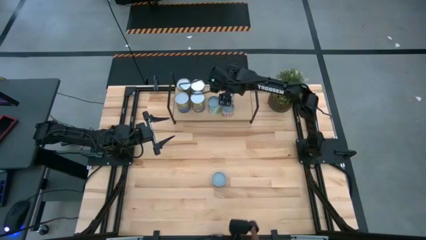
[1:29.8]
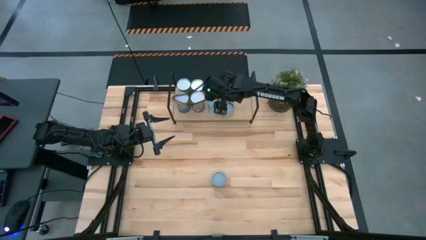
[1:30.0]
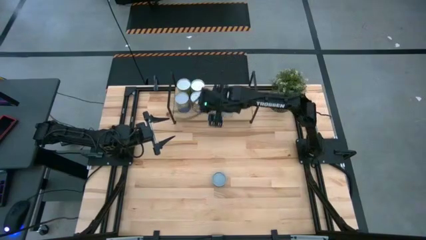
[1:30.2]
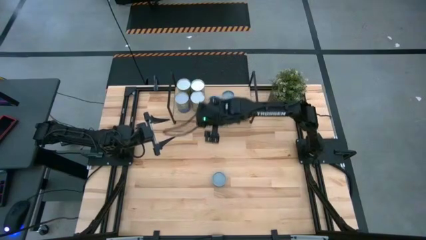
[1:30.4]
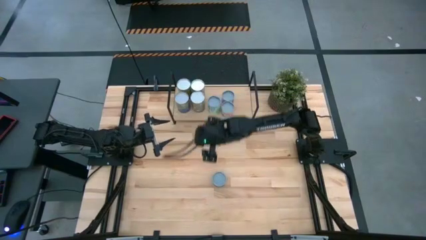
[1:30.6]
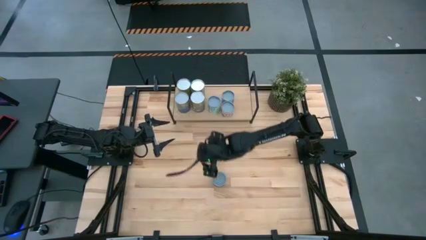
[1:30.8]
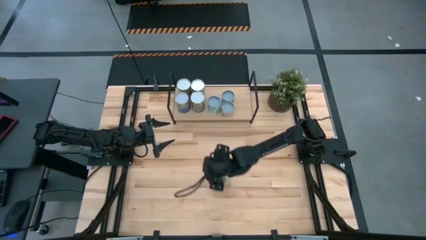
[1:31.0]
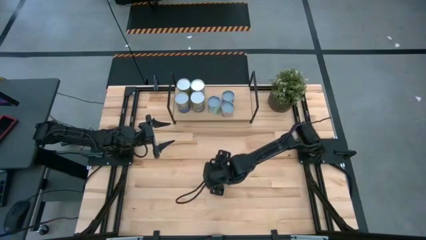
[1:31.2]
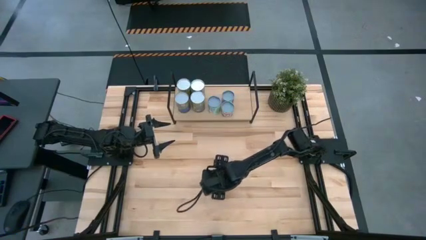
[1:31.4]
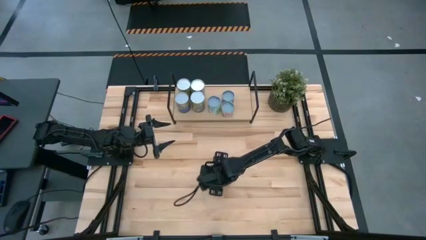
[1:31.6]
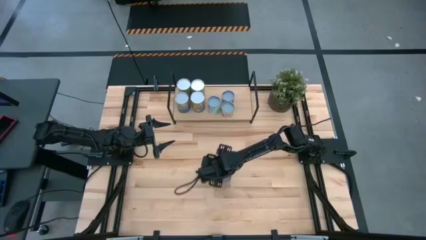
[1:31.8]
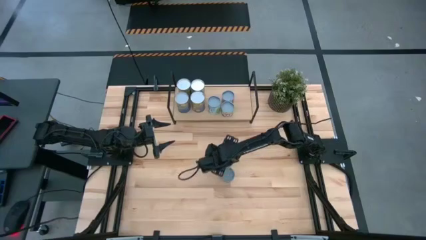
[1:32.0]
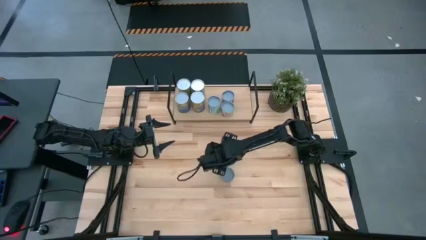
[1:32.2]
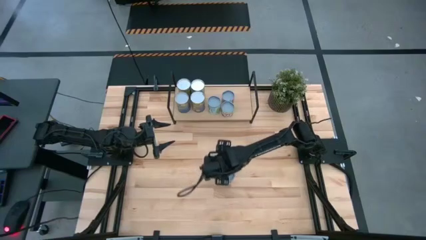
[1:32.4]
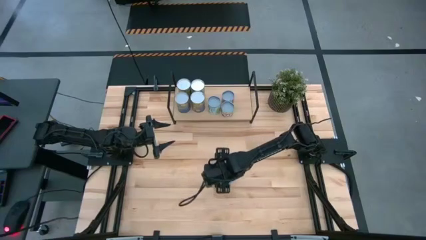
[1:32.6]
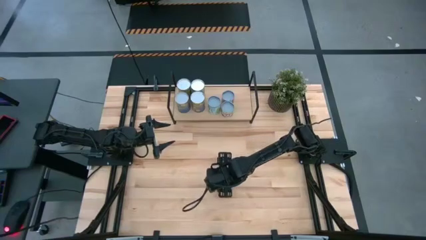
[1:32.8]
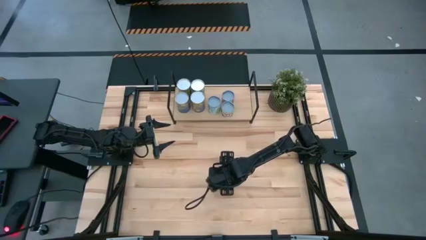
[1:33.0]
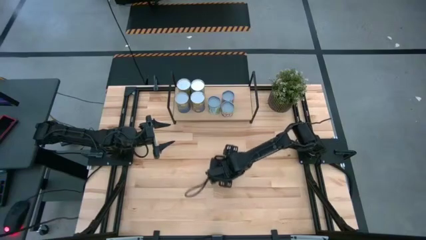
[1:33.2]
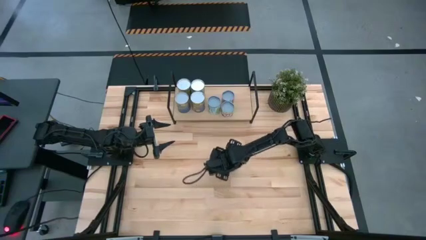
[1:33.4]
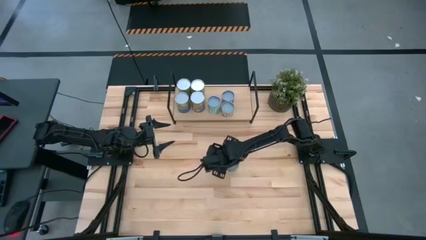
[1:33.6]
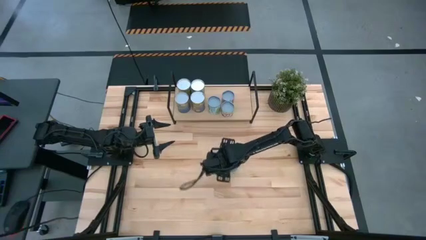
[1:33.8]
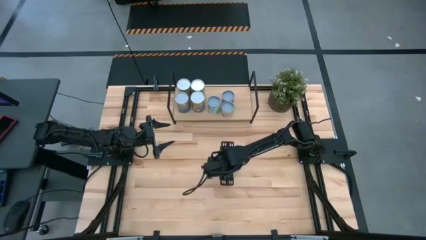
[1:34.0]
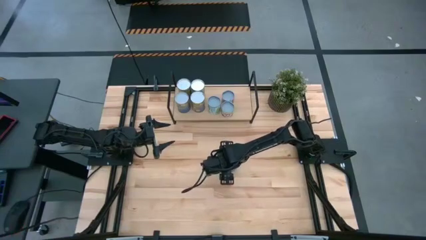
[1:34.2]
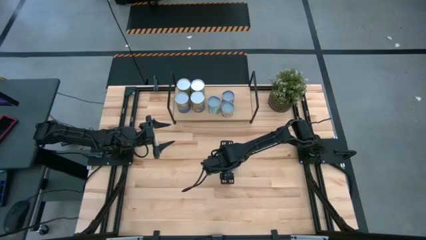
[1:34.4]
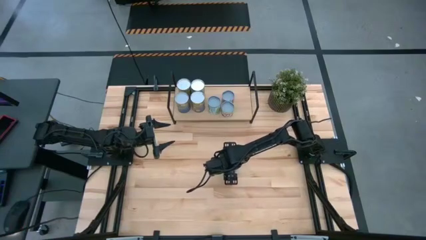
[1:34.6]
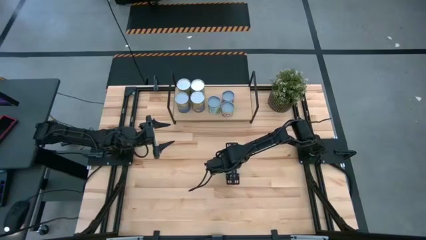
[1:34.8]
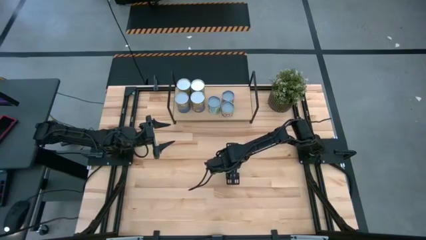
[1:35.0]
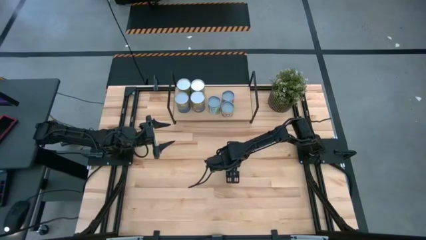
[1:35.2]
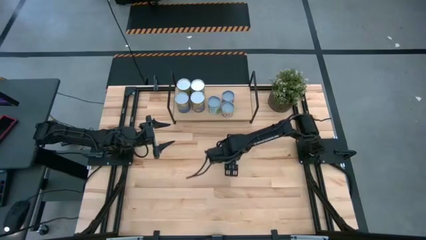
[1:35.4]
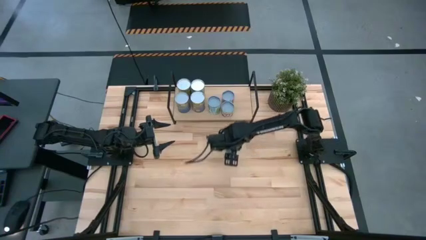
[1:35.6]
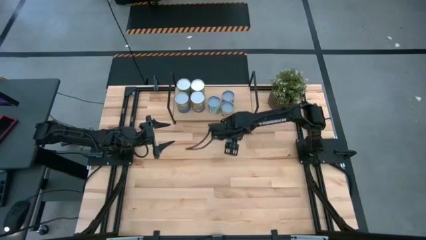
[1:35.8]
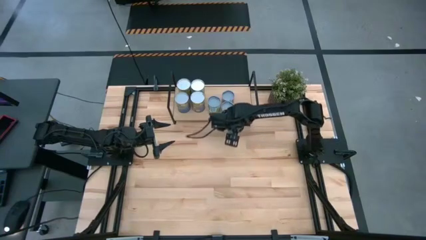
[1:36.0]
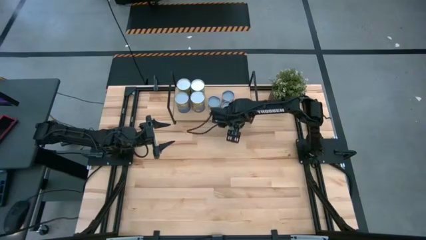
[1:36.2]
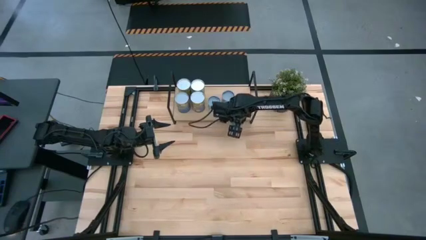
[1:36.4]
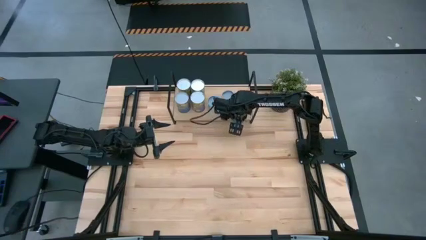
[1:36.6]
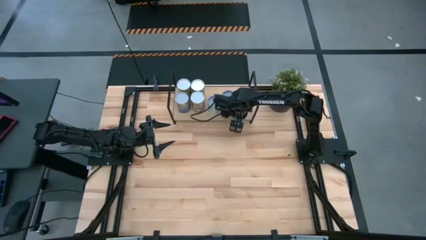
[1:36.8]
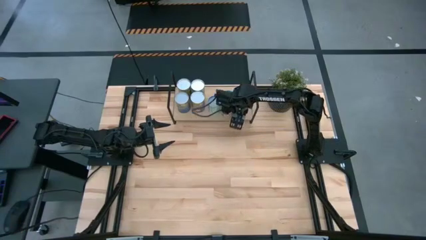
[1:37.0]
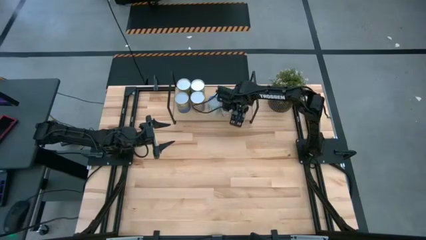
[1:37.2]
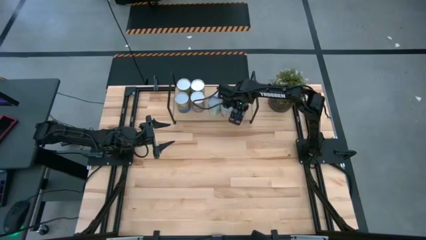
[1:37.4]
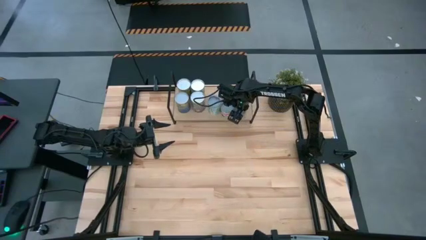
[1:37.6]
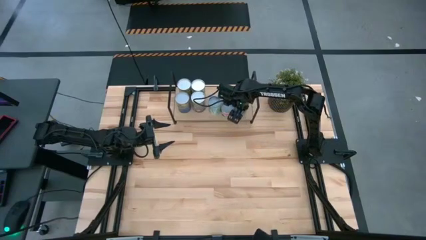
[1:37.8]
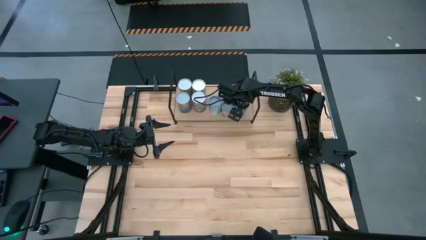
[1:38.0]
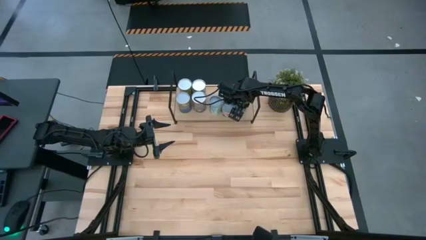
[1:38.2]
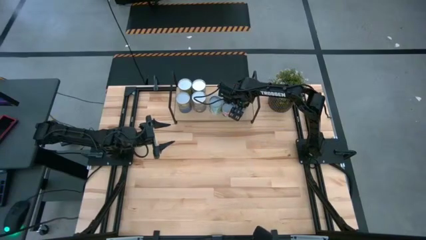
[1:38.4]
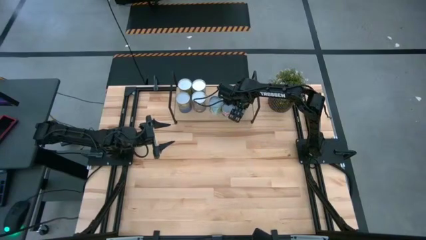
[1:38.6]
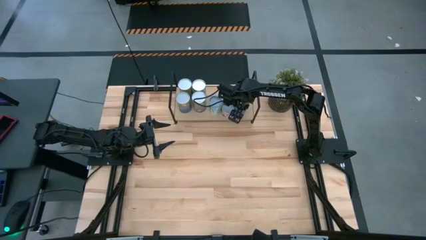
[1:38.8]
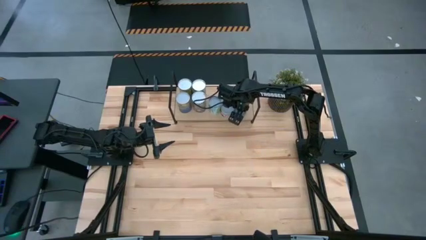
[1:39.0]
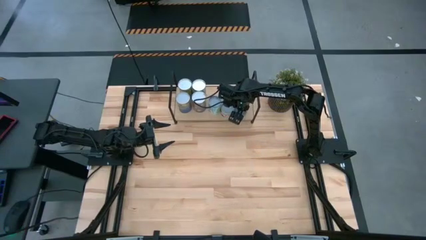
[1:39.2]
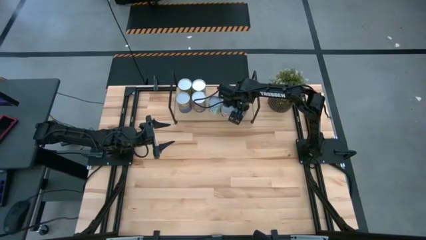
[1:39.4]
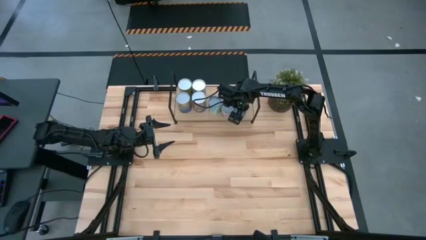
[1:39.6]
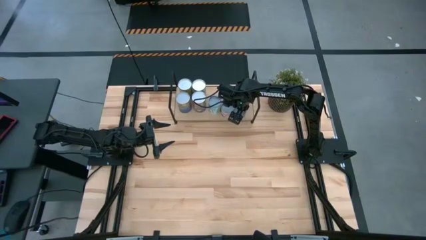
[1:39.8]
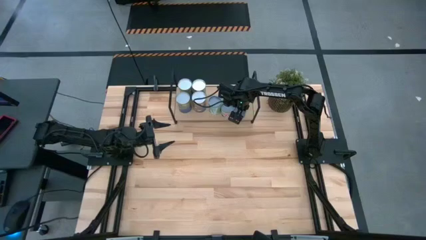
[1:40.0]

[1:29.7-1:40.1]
Task: Pick and place cans onto a shelf
Put the canned tuna on the shelf

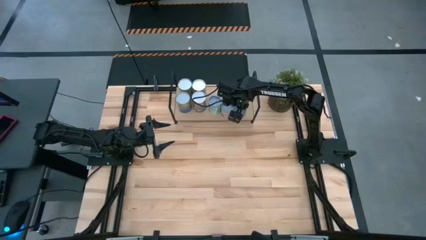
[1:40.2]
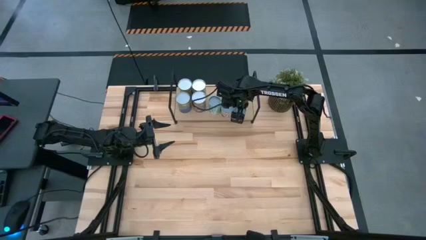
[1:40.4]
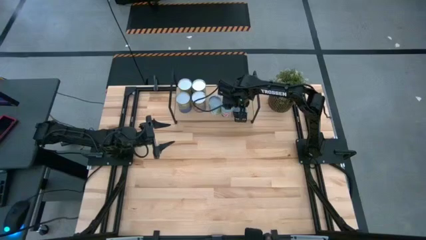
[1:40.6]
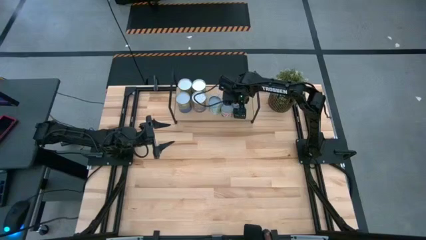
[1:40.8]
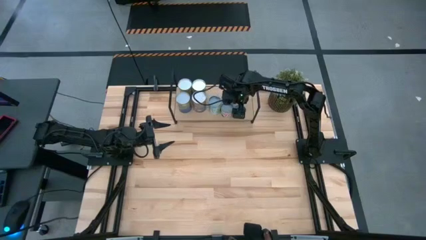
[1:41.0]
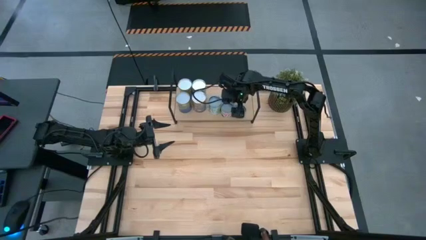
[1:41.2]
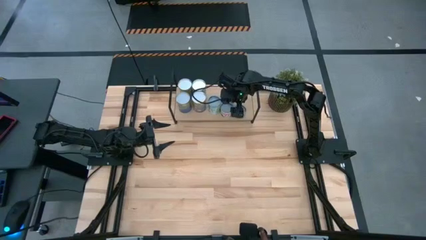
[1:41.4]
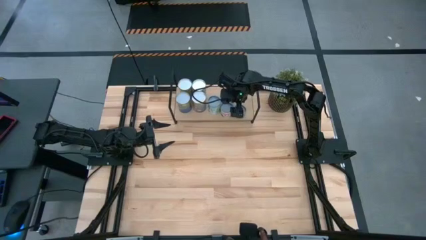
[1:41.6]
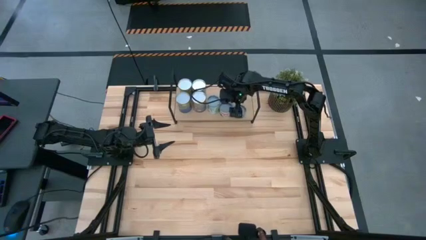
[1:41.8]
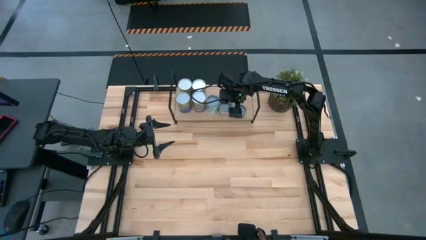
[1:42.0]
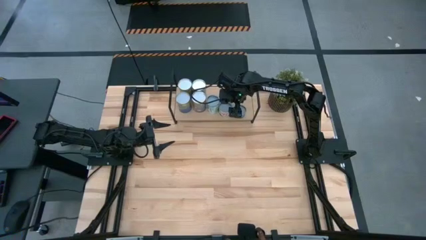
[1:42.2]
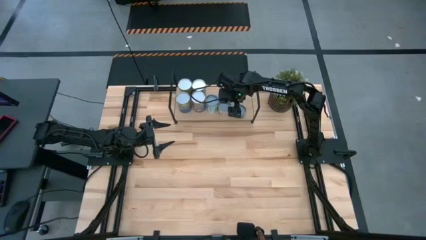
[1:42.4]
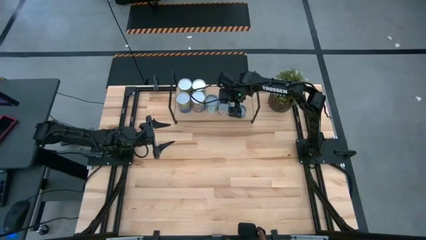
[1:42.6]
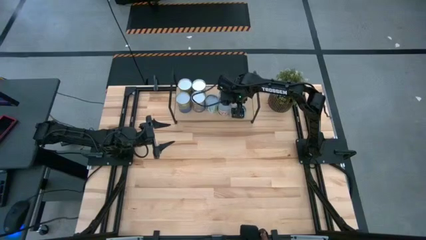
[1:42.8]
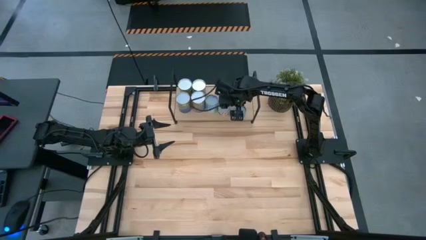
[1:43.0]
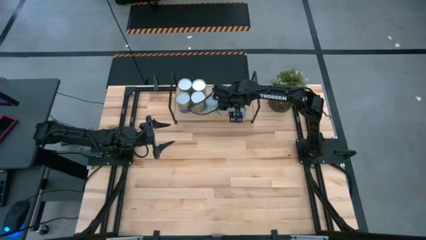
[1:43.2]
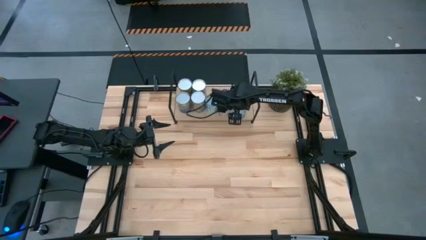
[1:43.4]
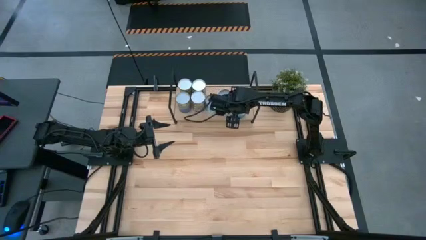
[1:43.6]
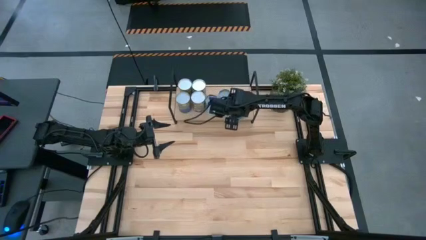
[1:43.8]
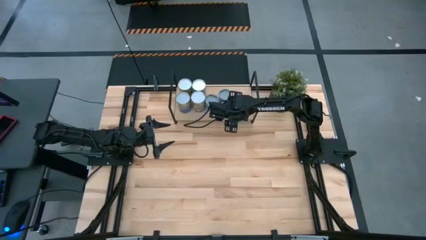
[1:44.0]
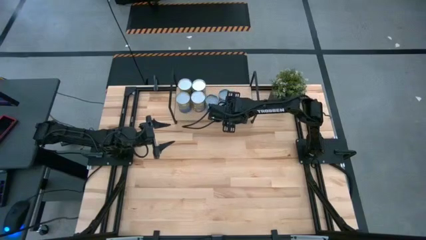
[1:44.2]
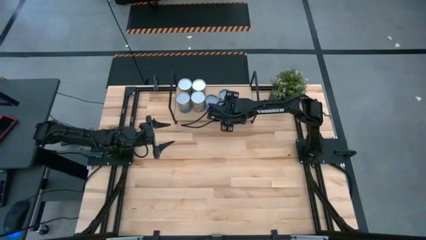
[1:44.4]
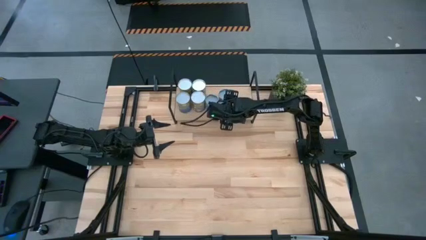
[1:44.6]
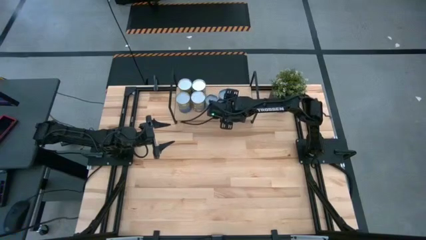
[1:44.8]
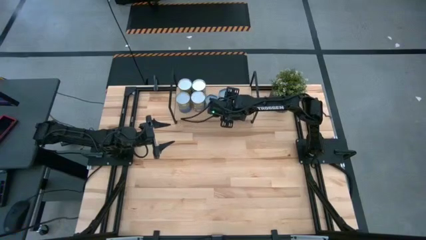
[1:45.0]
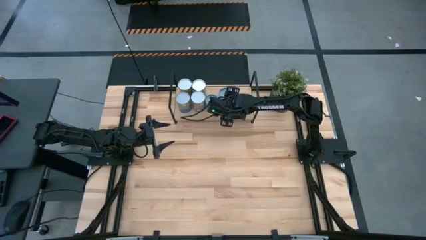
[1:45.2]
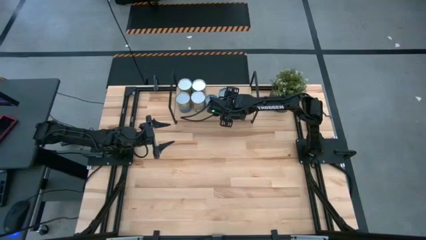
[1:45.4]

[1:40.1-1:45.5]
Adjust the canned tomatoes and canned peas on the shelf

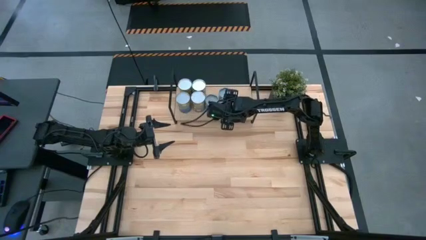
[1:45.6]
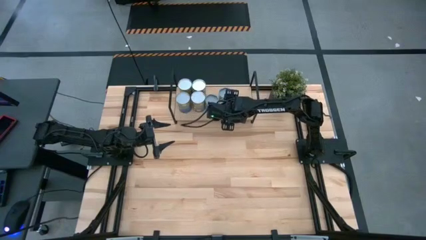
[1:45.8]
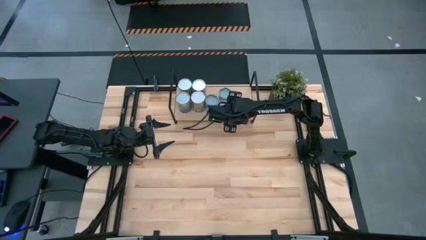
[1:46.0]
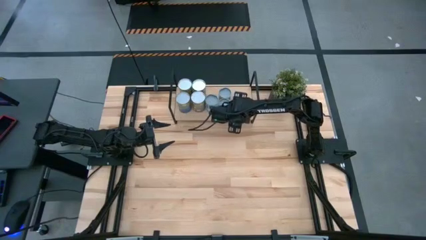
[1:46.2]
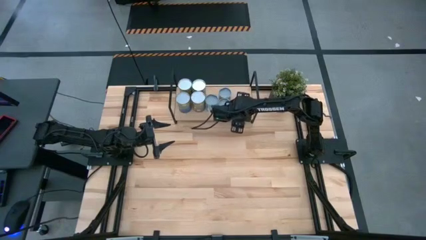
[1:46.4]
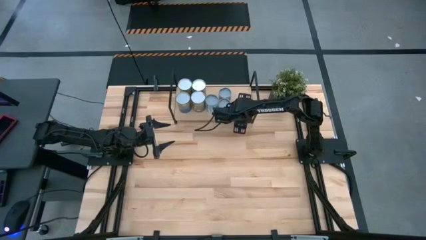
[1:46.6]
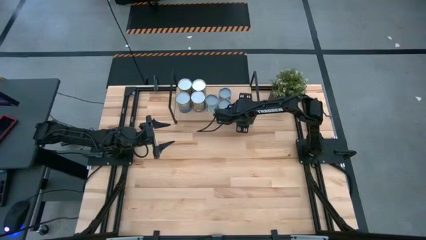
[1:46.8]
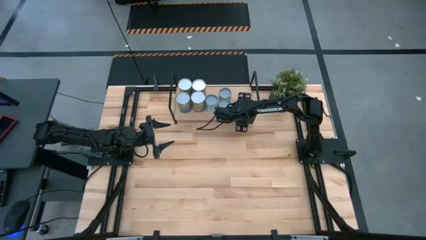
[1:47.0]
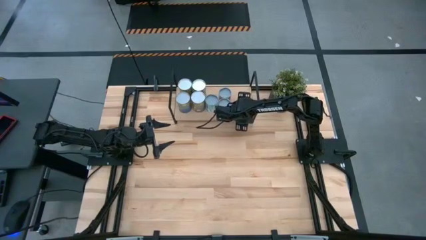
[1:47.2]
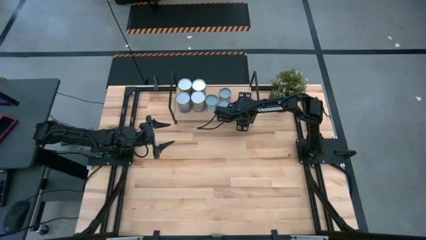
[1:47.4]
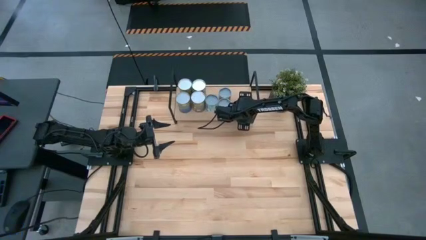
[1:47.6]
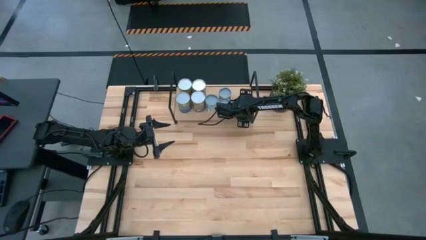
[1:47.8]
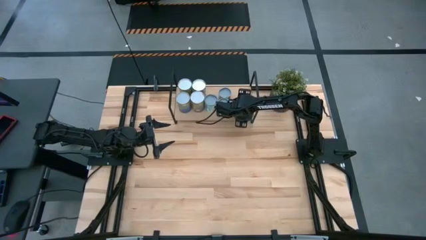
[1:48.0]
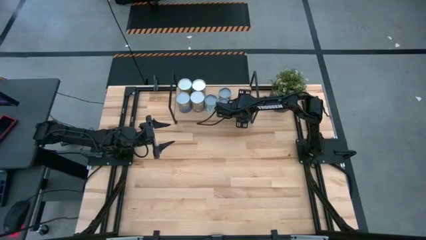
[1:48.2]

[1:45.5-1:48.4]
Adjust the canned tuna on the shelf
